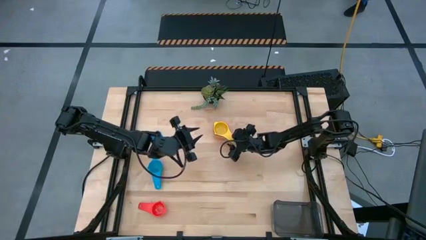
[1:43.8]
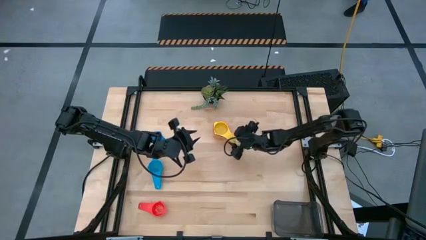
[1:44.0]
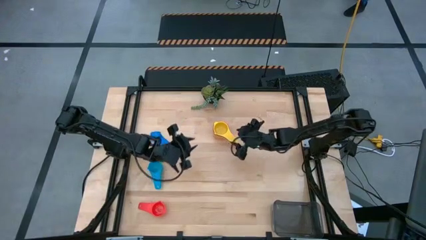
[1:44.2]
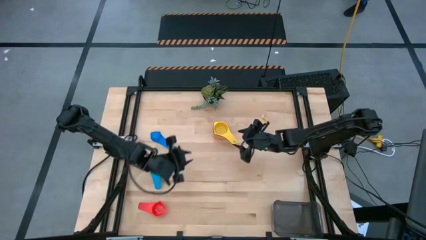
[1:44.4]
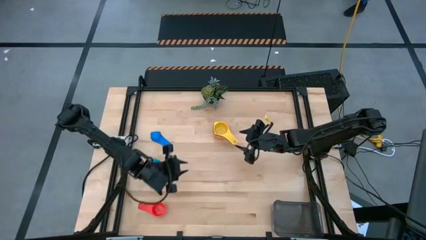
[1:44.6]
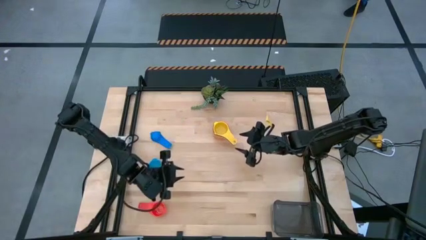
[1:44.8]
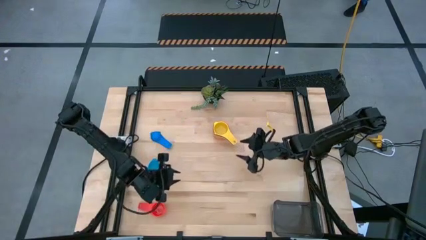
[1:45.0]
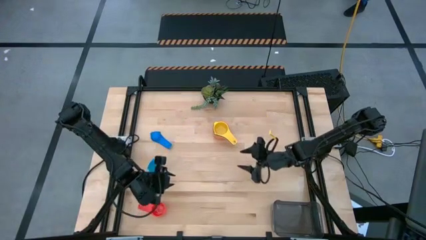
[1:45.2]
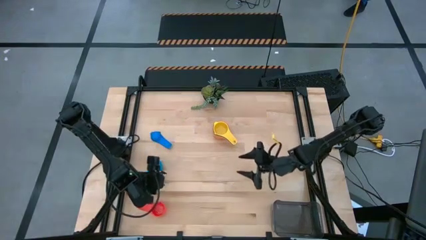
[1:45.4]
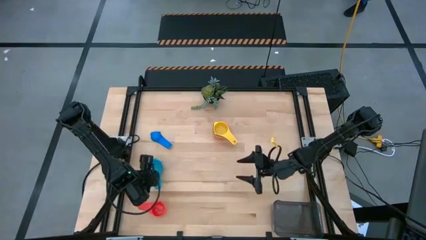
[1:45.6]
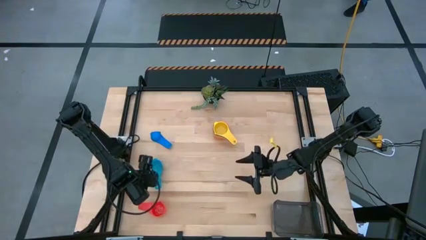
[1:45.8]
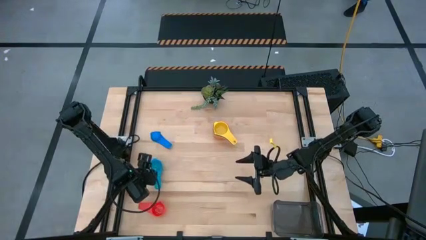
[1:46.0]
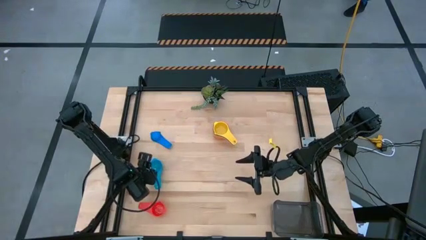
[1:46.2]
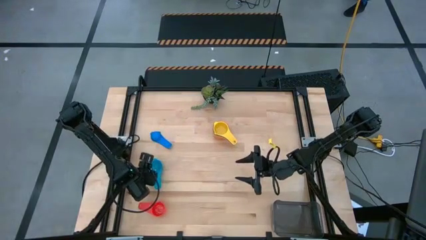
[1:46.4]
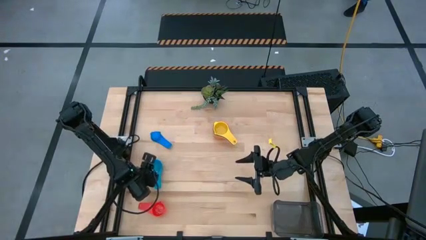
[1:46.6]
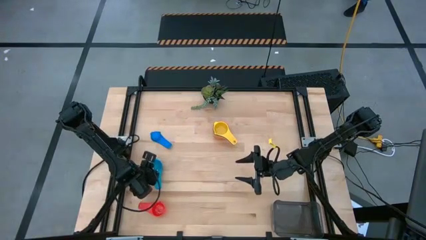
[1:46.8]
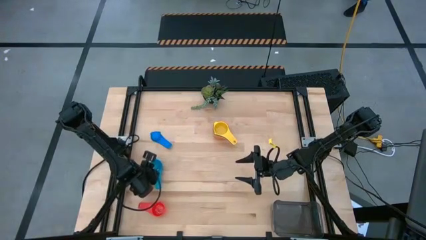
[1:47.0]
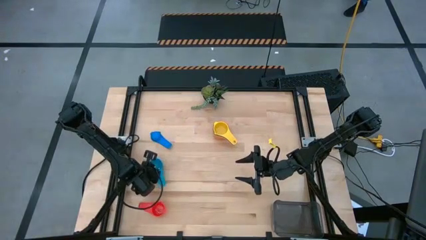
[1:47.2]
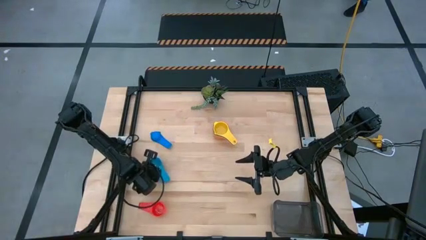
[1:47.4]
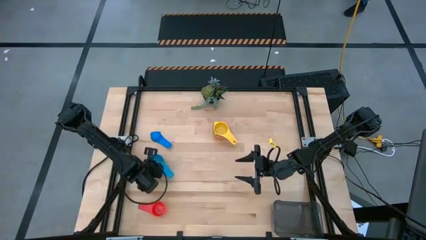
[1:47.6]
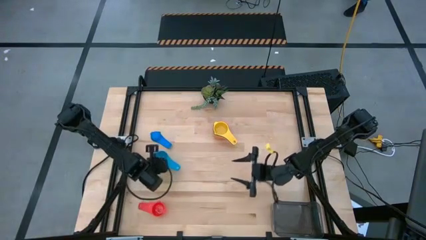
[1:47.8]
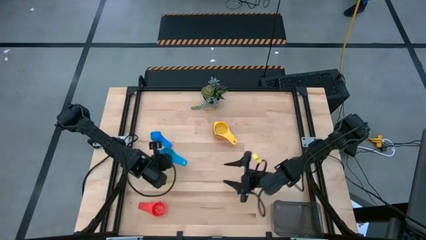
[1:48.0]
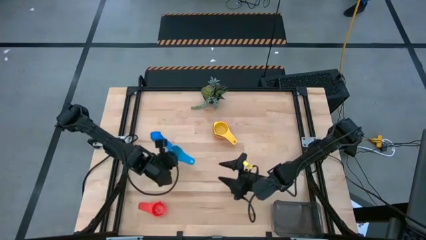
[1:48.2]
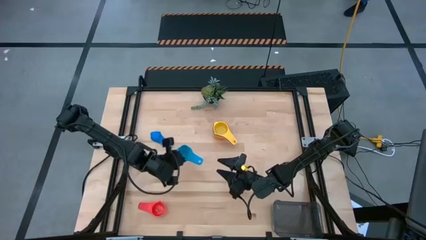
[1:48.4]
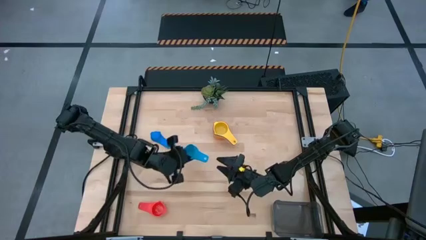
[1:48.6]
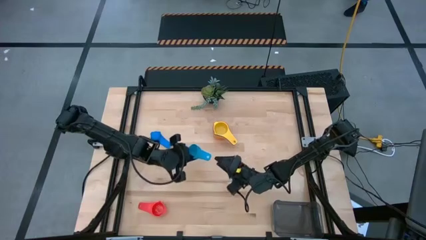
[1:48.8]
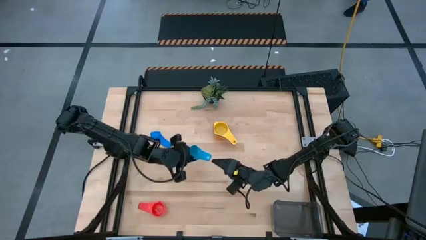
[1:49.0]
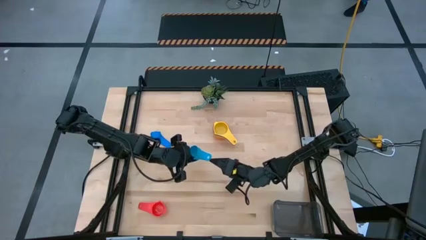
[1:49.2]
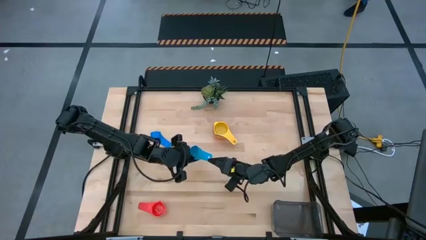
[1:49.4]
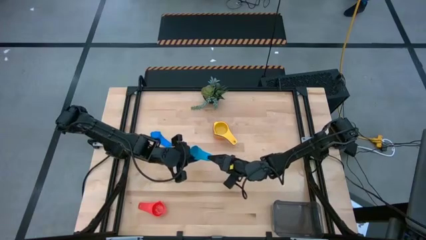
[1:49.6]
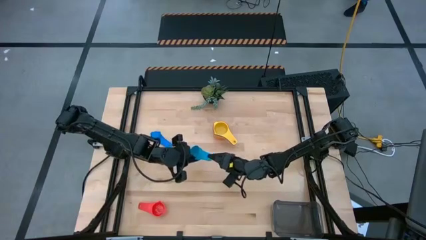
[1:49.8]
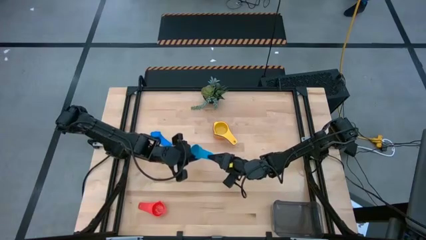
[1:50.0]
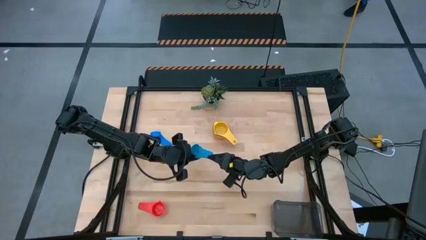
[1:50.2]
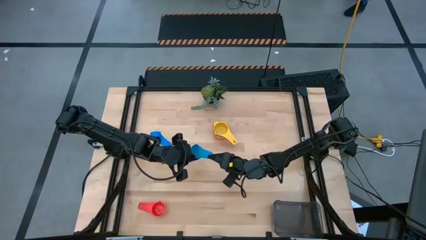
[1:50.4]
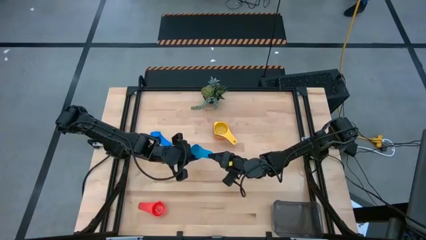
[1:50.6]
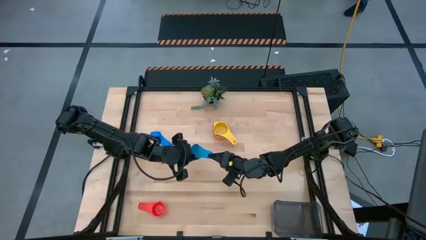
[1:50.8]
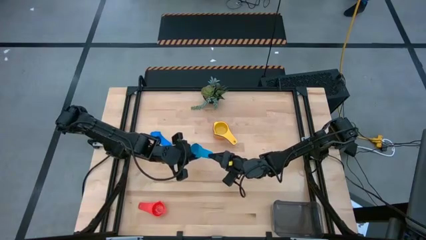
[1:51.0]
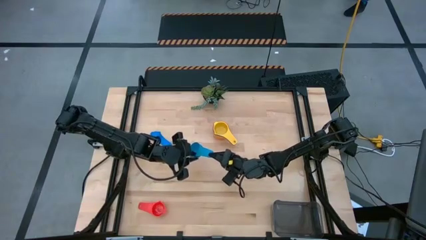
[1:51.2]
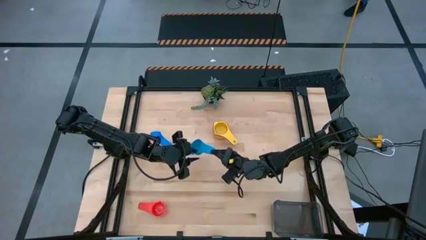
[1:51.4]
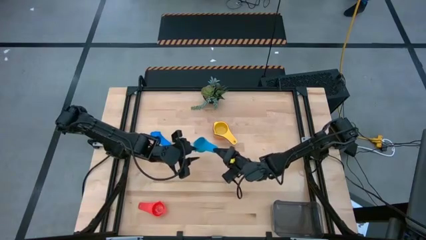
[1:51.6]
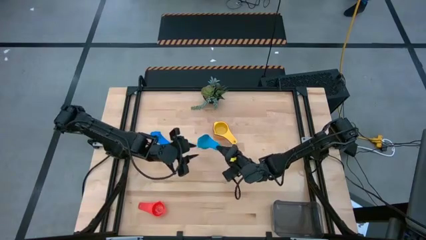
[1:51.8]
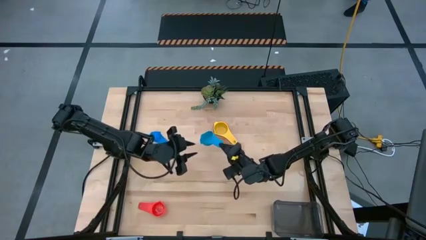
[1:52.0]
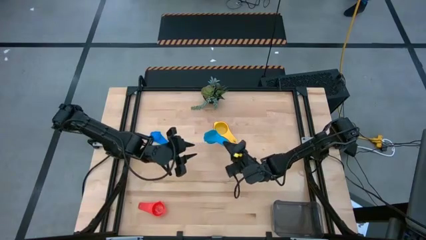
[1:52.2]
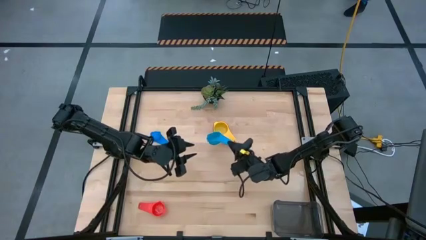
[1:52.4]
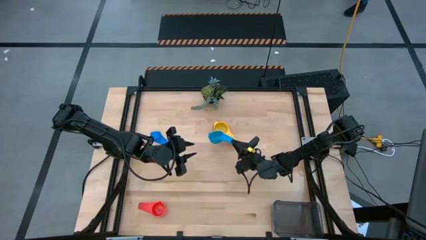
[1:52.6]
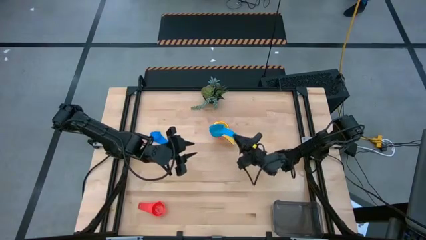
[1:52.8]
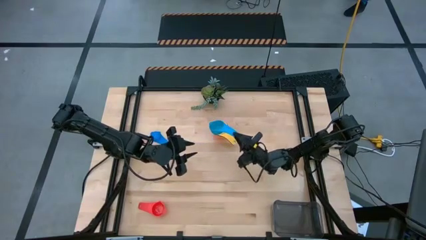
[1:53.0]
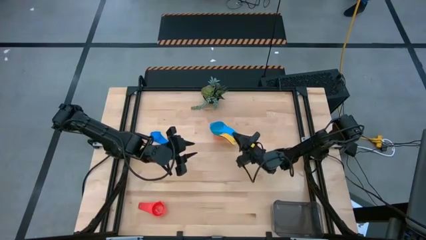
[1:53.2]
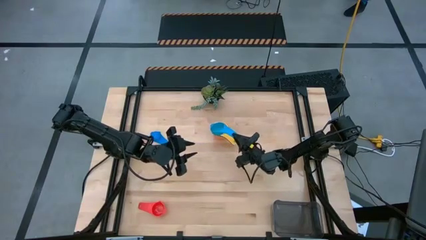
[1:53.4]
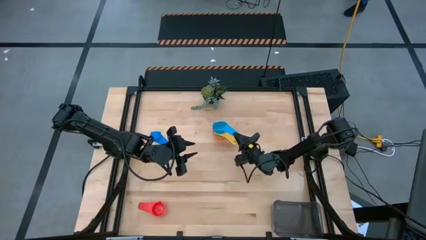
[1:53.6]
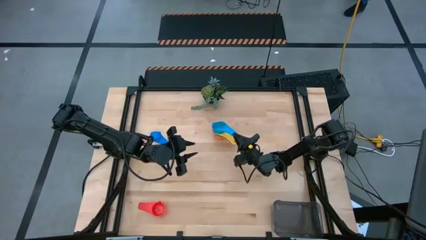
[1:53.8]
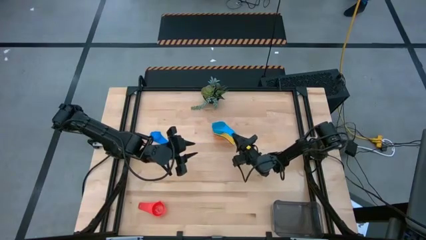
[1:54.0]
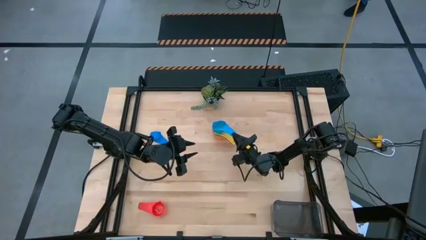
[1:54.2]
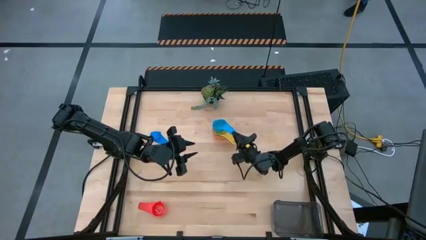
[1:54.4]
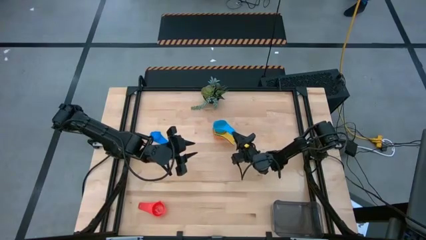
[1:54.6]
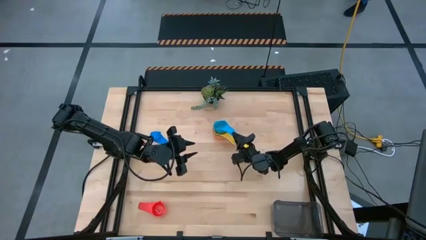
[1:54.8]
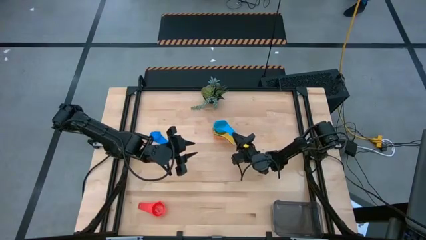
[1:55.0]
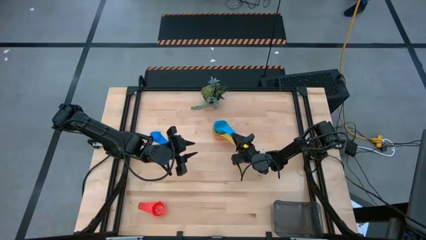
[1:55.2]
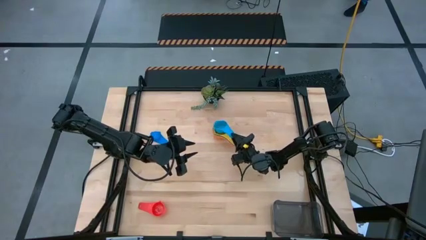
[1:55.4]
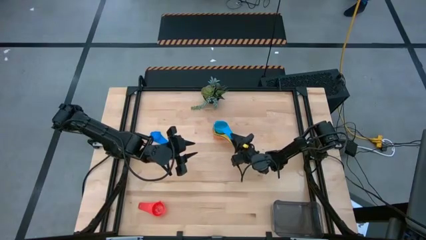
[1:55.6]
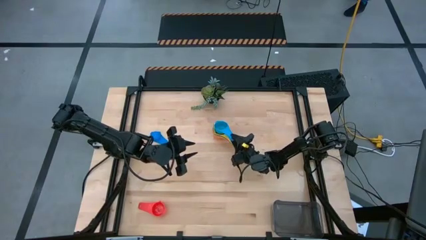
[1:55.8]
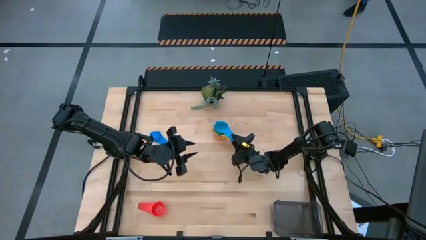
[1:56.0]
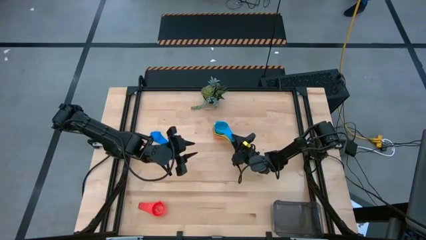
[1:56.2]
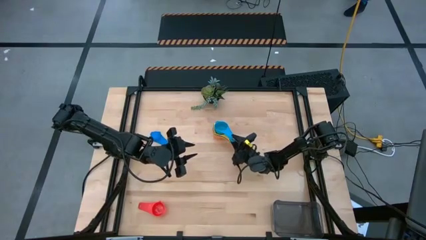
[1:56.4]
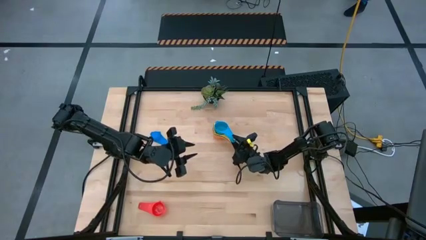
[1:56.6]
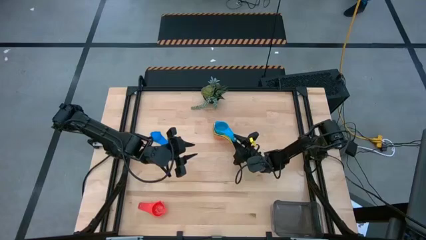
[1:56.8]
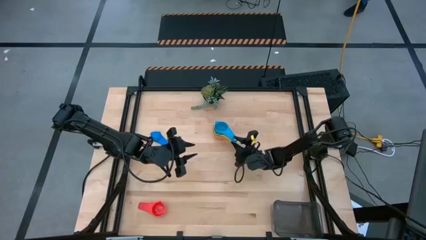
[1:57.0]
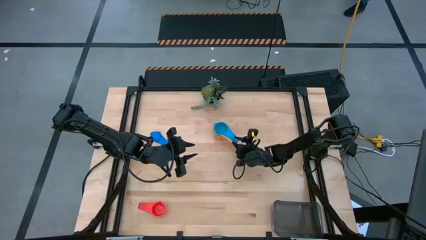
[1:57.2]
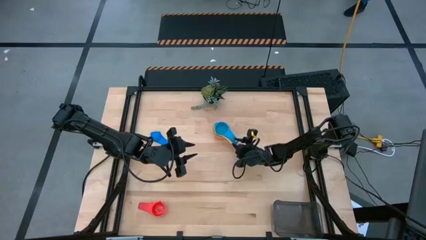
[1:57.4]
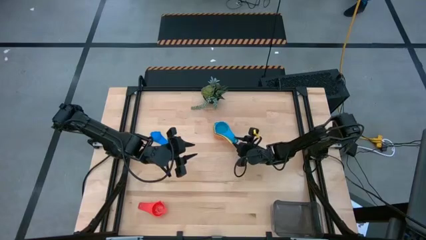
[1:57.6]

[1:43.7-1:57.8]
Task: Nest measuring cups in basket
Stack the light blue measuring cup on top of the yellow measuring cups

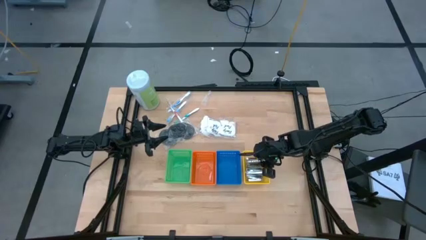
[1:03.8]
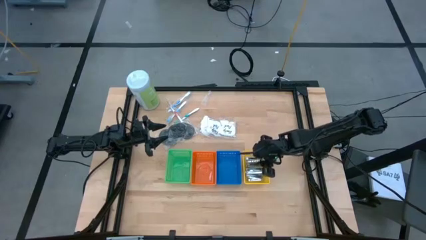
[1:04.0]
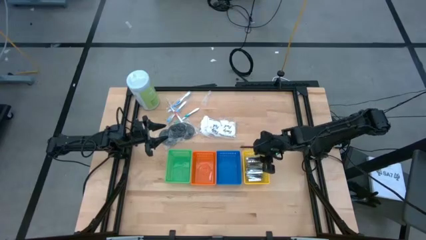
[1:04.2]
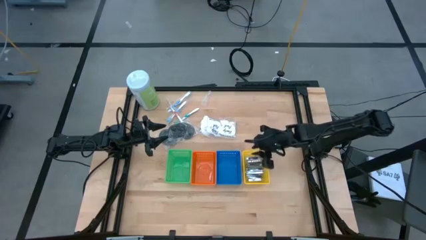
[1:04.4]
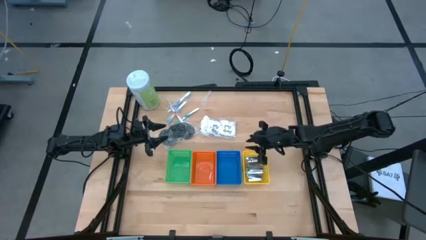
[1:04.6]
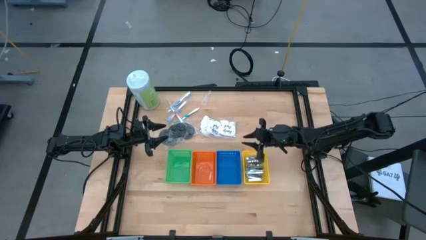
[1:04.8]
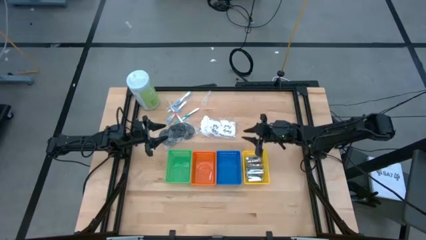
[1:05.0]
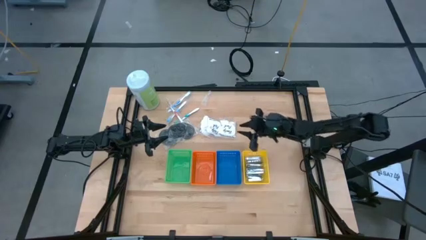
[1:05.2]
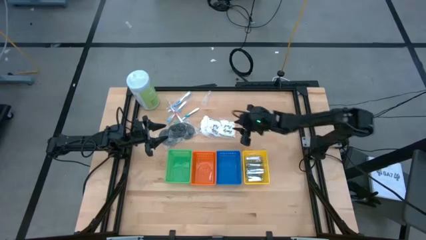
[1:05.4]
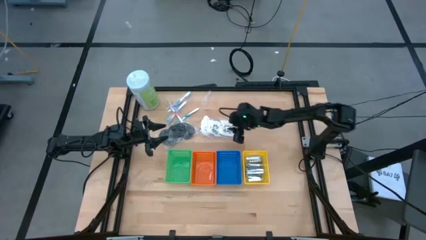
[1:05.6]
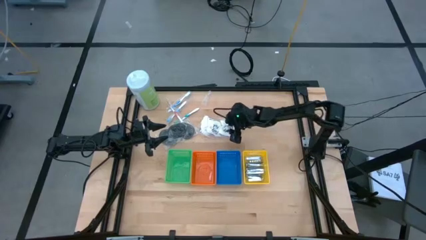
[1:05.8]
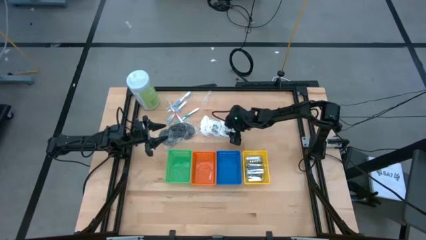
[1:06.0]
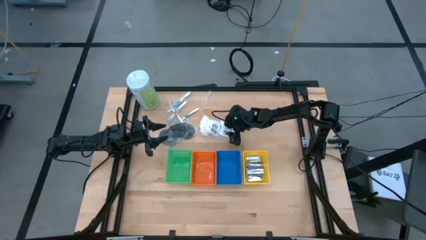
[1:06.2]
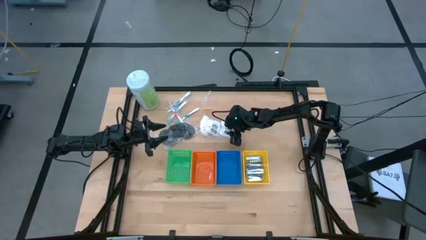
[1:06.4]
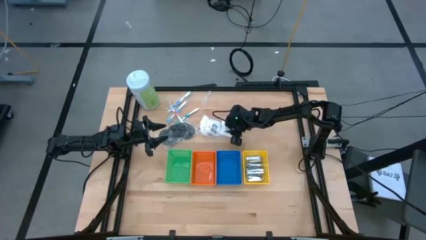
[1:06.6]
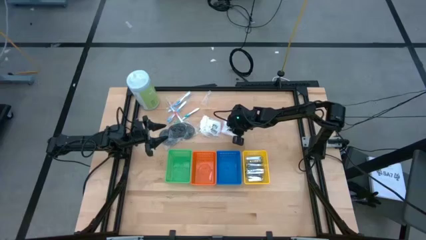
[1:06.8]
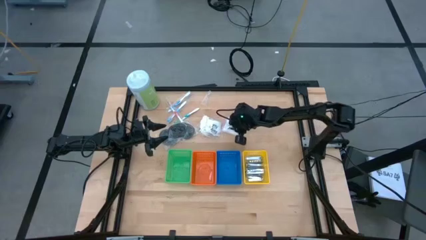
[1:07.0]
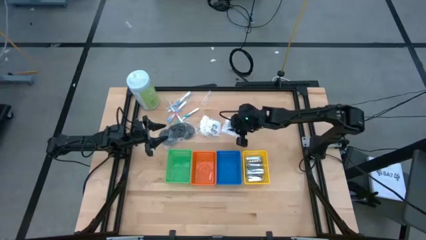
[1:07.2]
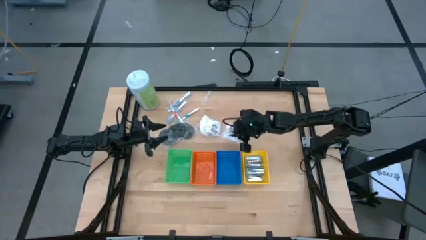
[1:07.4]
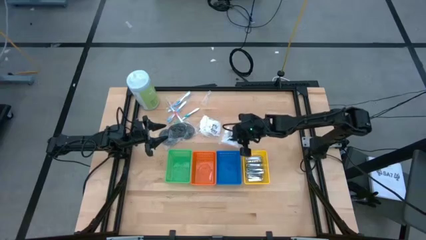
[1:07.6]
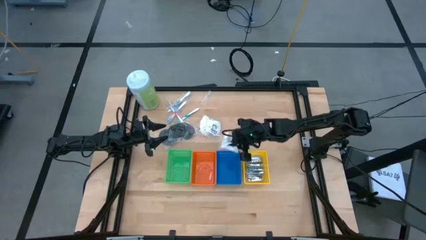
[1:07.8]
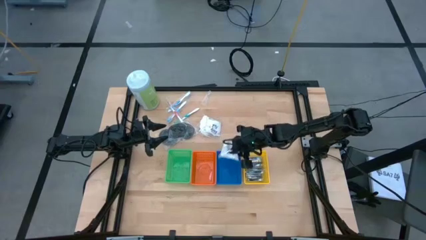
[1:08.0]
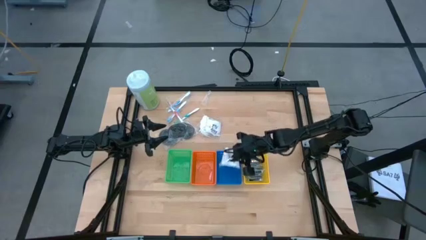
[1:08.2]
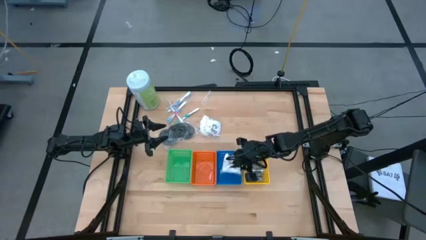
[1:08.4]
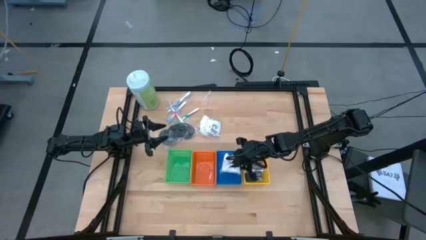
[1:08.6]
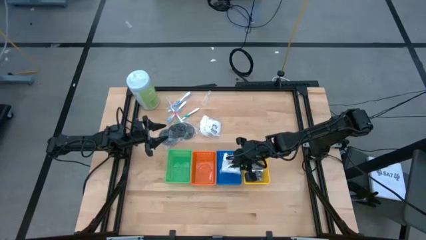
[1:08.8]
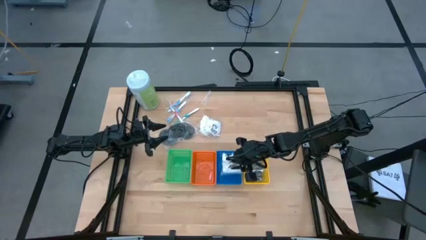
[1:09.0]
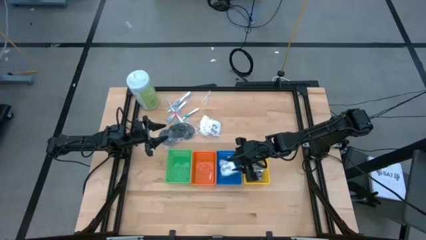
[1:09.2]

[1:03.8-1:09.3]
Task: Pick & Place Travel size toiletries
Put the cotton pack into the blue basket
